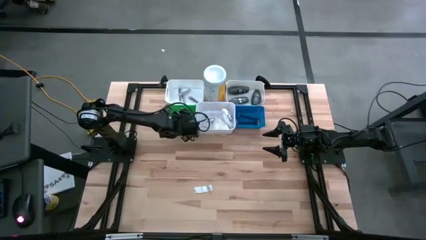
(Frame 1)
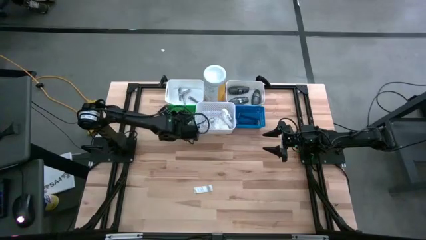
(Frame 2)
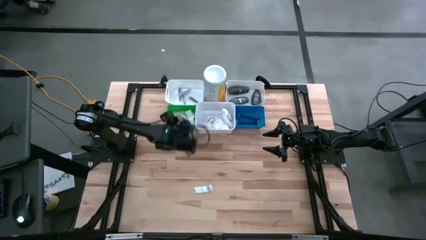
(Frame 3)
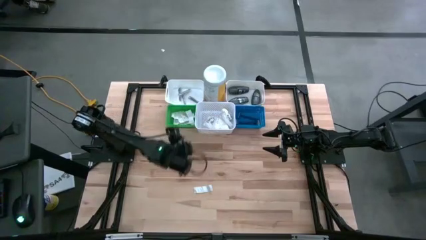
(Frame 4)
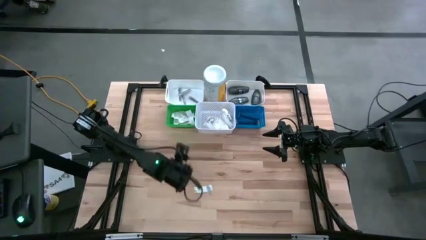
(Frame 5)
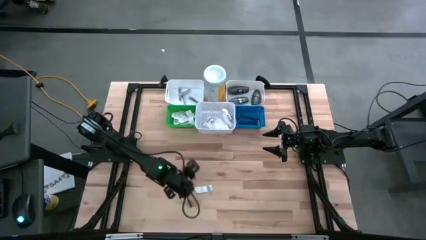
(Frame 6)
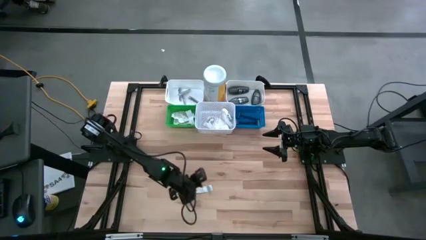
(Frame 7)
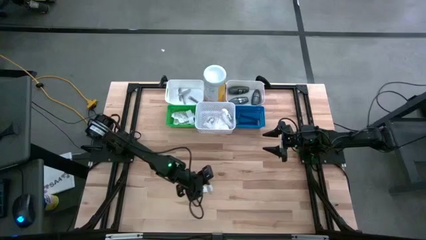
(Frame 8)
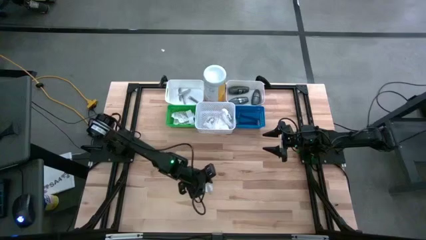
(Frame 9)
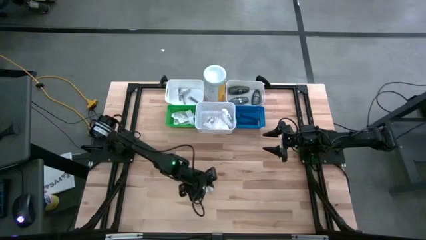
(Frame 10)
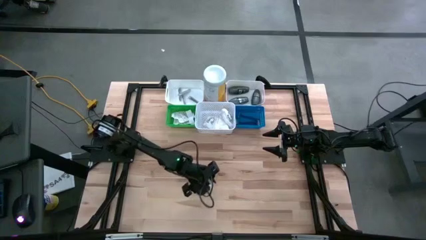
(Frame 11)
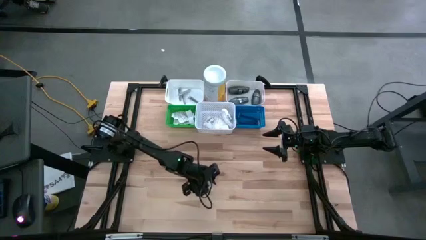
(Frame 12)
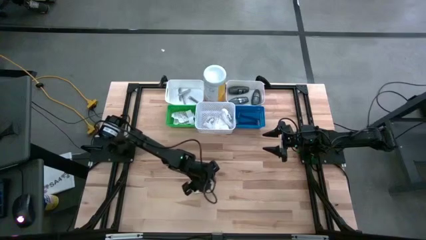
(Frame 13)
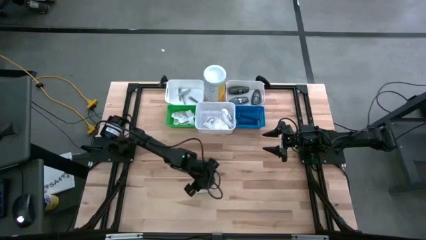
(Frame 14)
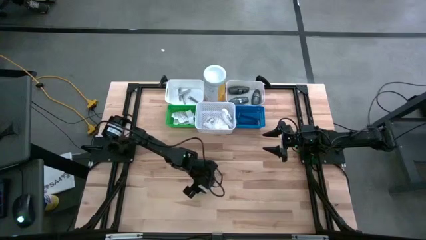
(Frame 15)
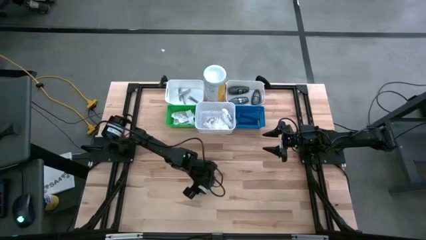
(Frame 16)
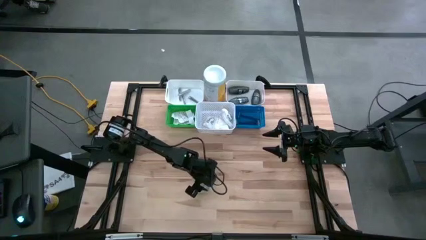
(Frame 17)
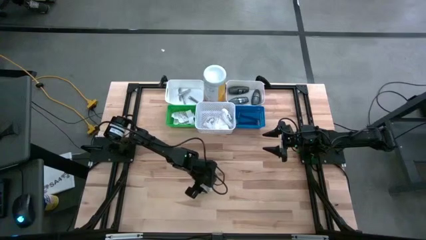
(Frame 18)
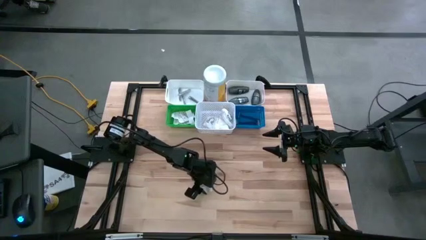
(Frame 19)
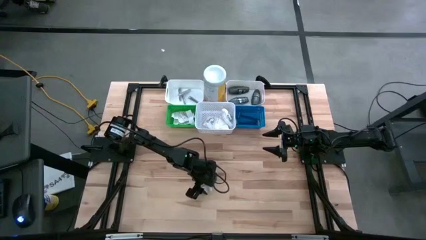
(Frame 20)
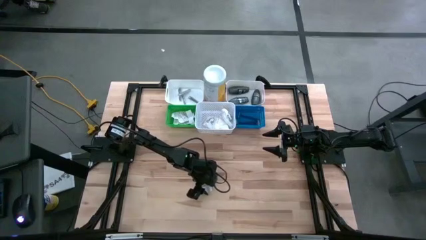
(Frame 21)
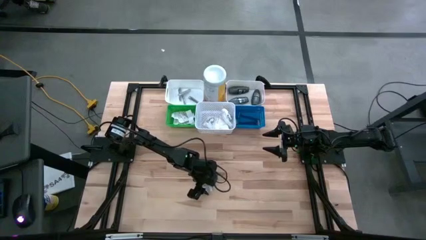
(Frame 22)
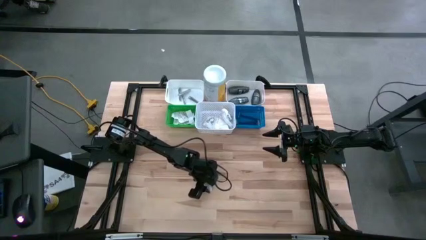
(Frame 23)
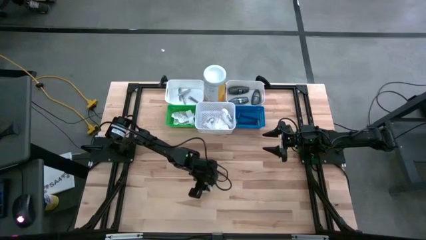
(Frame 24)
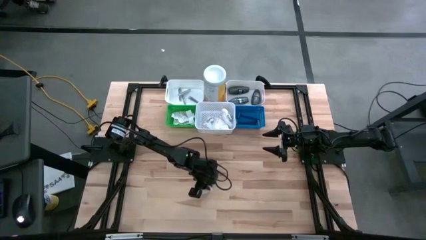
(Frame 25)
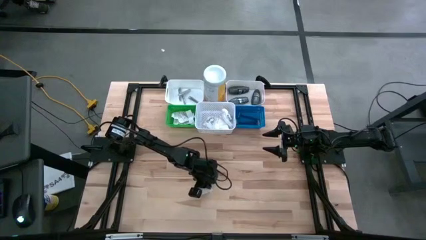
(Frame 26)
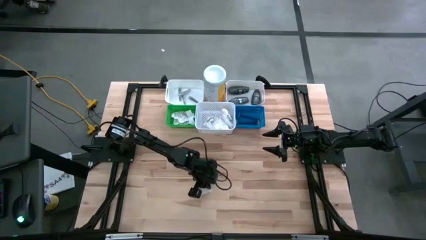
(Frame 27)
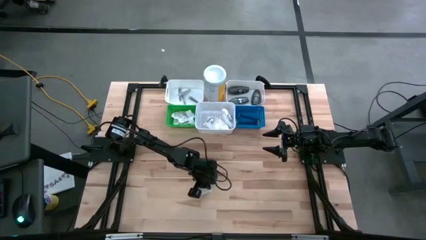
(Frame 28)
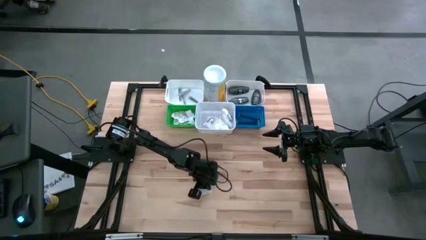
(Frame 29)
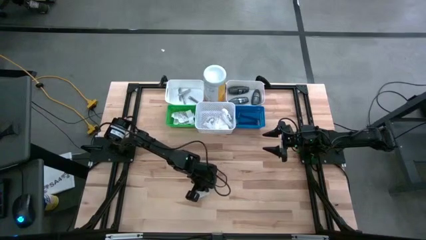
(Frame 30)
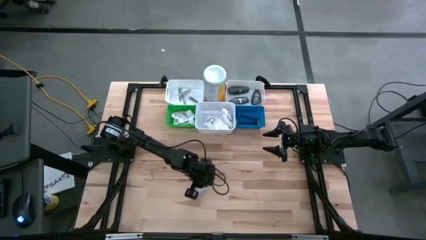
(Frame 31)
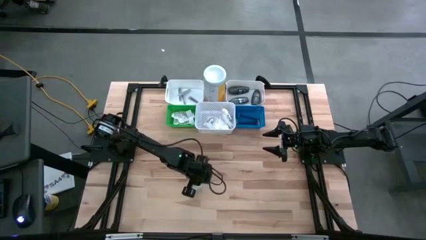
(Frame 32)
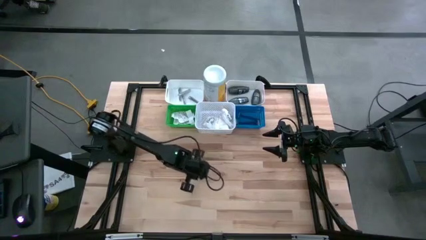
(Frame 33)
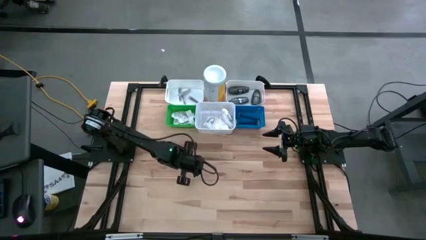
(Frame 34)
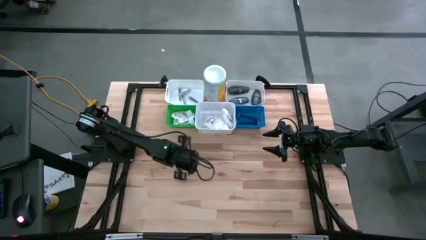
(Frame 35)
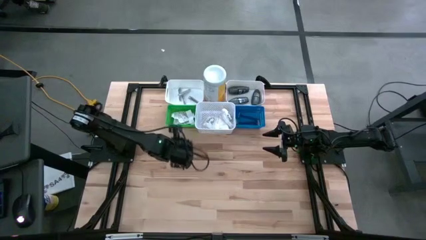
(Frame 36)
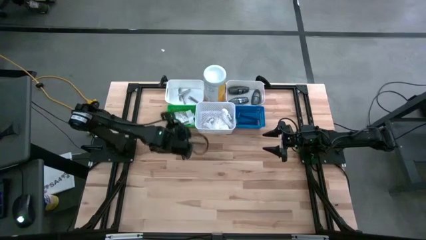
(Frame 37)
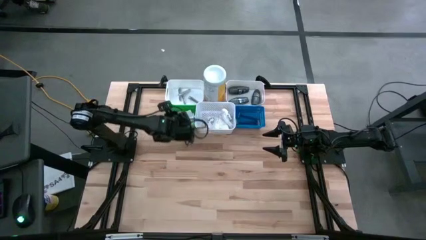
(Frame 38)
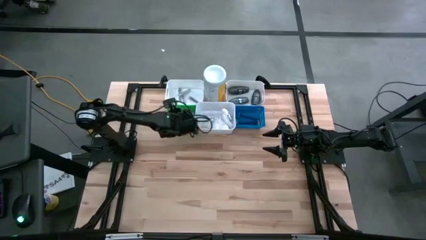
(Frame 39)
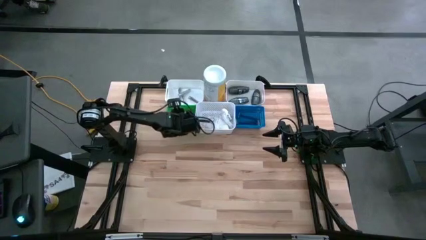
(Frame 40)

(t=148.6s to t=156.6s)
Task: Pick & Place Travel size toiletries
Put the white bandage into the green bin

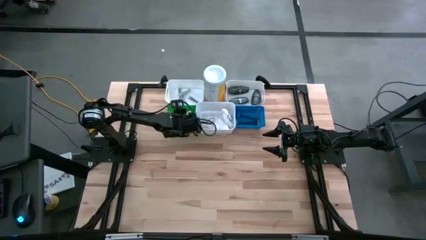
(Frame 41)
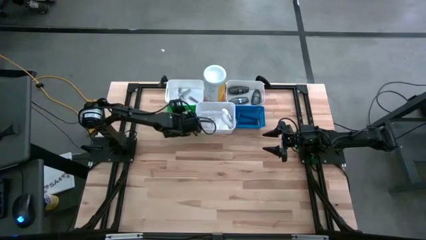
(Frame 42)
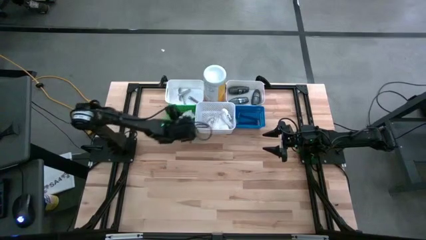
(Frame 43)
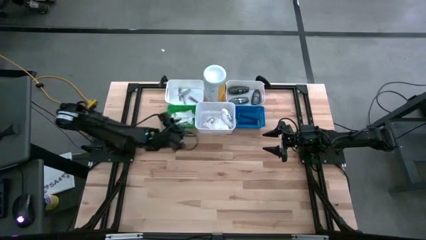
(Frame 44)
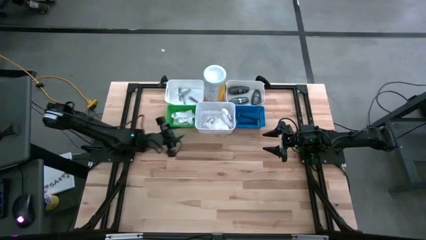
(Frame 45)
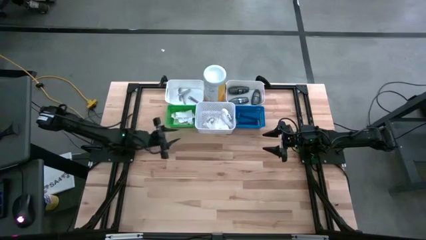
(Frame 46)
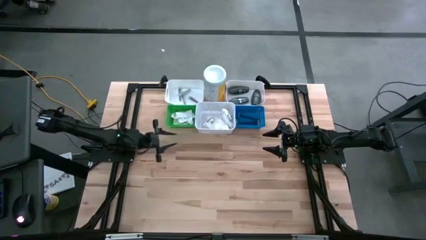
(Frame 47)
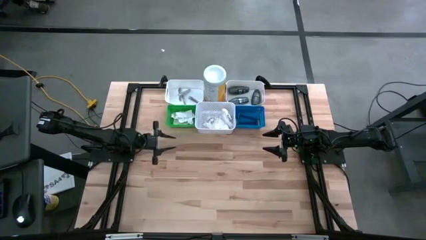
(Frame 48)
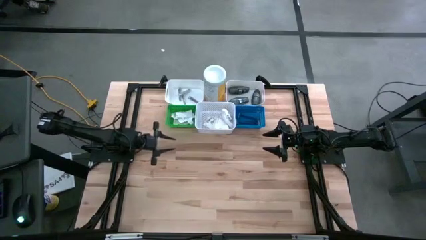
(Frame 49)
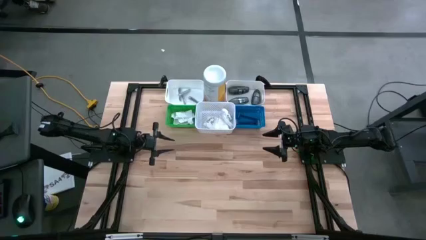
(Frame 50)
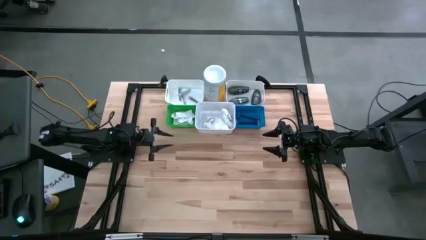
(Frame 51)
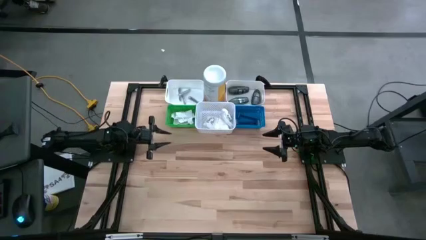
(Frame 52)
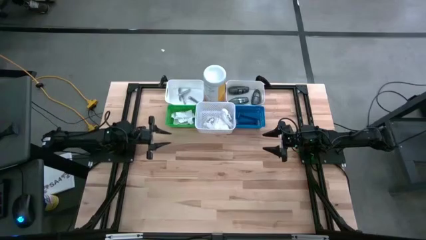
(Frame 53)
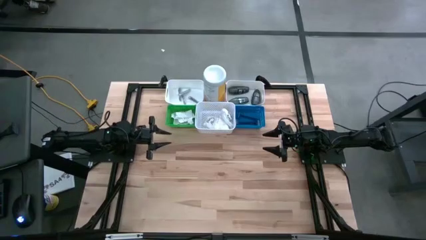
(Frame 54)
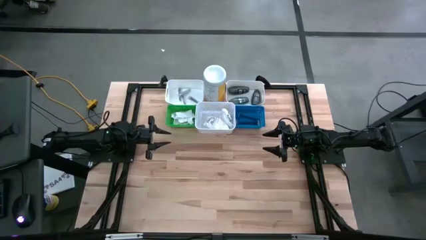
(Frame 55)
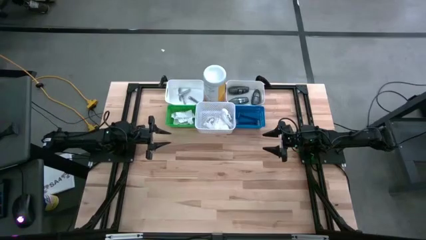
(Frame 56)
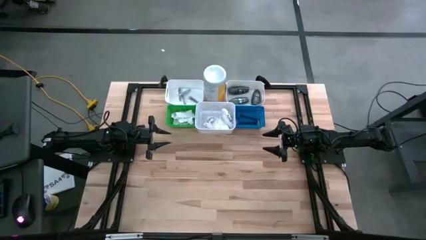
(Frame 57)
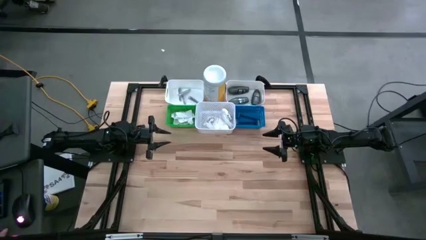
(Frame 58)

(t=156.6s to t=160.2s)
Return to Home Position

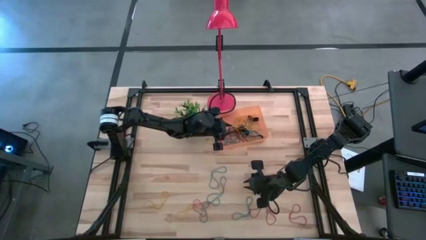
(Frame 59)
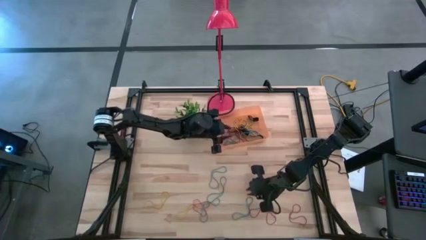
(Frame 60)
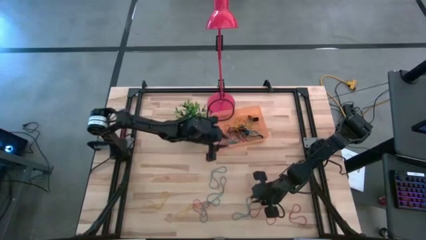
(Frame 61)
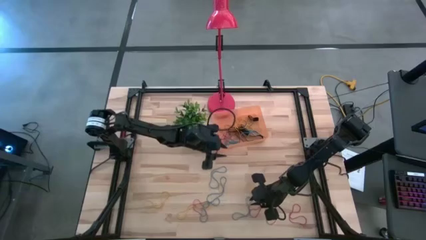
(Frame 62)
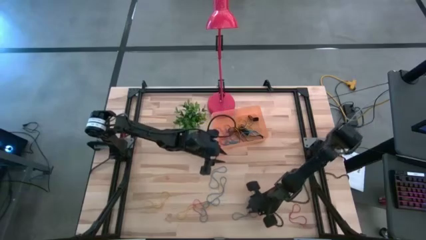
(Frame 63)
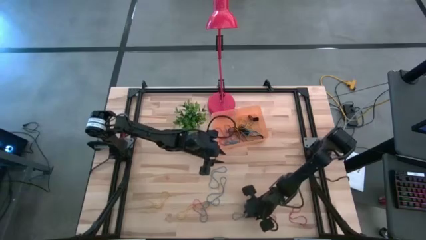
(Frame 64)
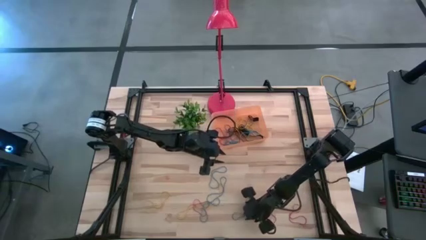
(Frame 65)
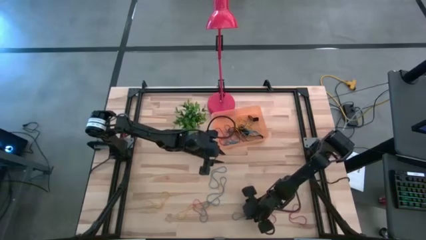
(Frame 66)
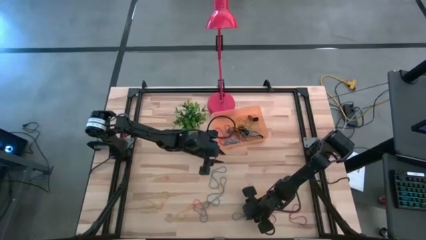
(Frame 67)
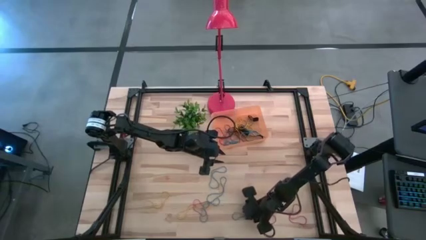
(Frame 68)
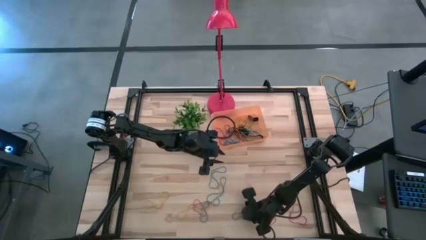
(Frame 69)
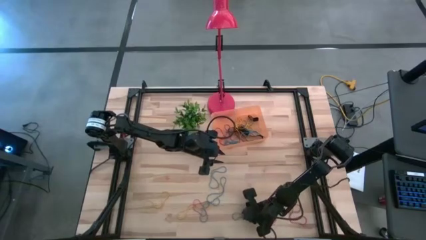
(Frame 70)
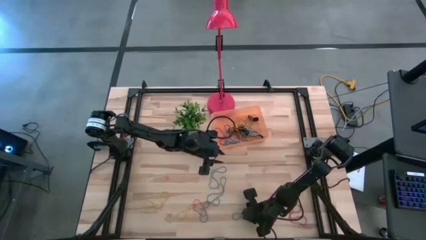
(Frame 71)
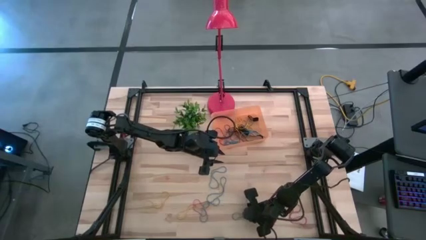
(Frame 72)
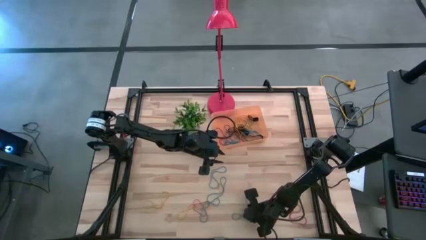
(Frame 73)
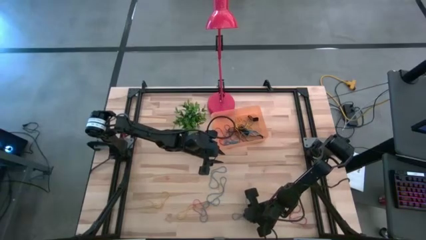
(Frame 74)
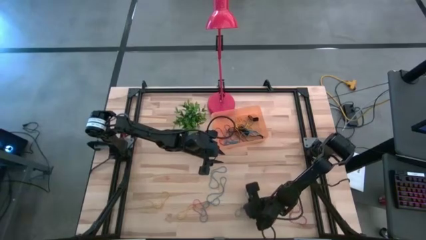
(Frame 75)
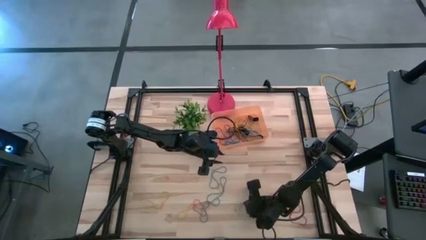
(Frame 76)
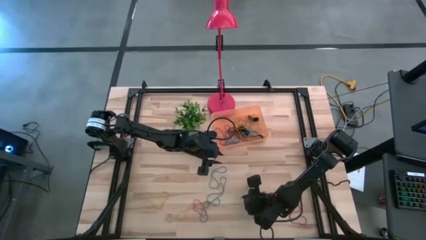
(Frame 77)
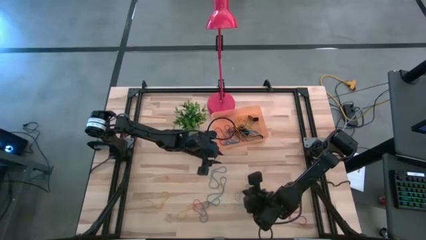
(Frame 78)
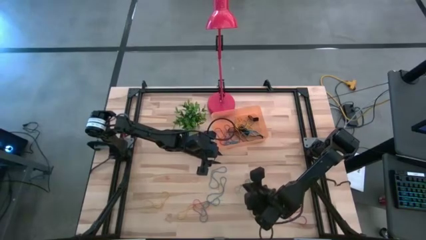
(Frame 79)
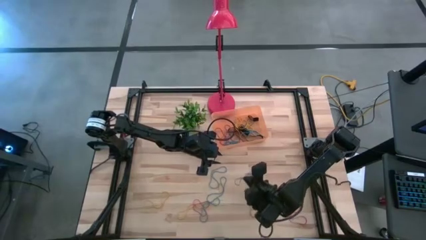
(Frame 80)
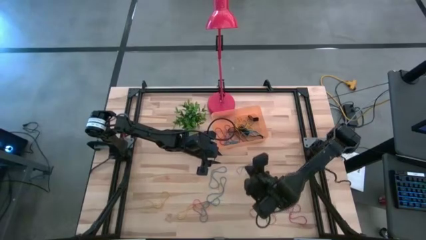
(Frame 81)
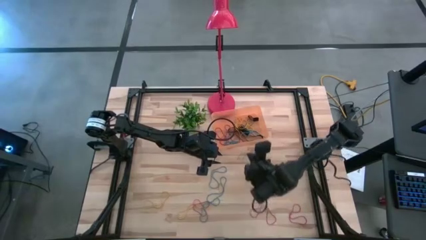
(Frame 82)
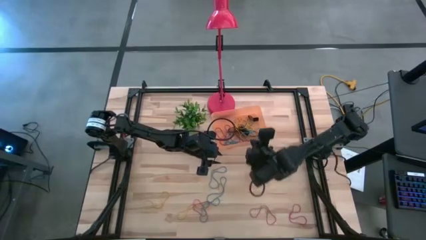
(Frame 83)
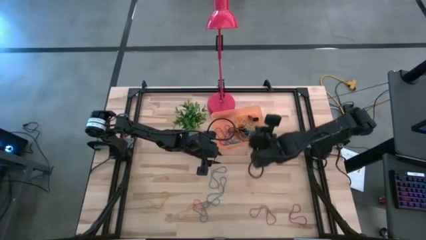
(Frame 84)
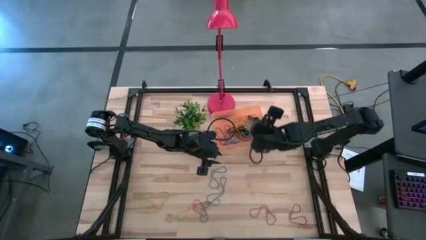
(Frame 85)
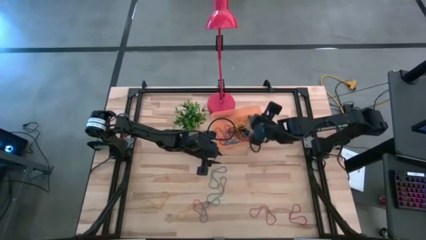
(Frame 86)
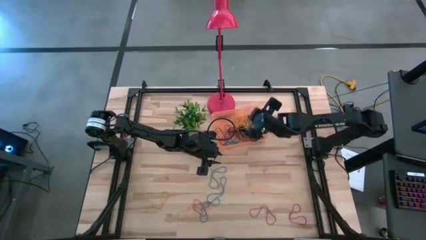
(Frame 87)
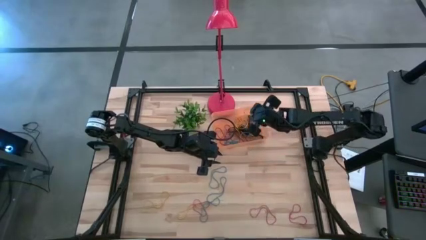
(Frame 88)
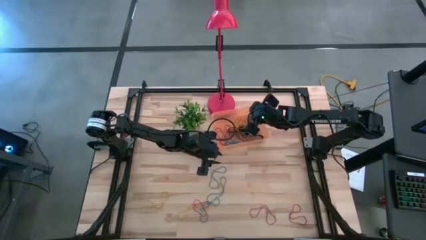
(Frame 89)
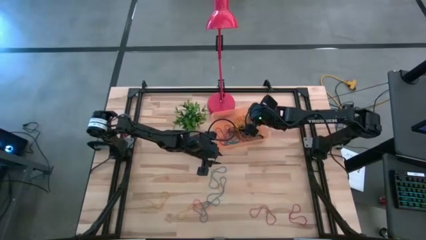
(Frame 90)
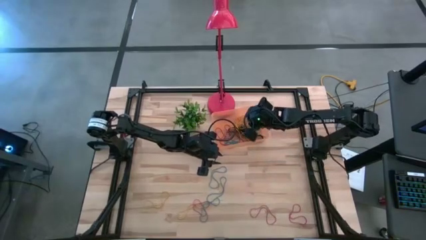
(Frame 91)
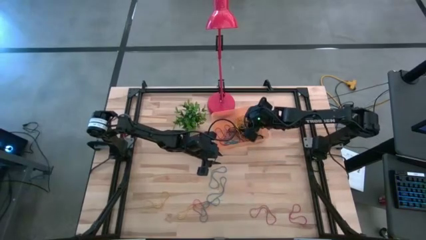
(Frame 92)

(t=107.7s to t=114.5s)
Task: Pick and place rubber bands into bin
Put the blue rubberband into the orange container
